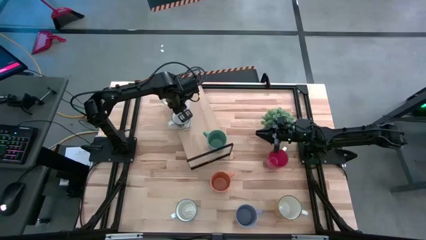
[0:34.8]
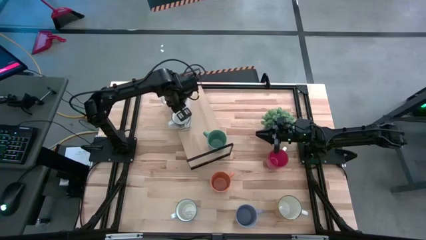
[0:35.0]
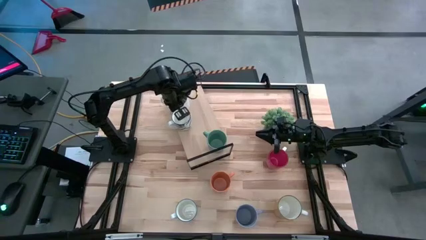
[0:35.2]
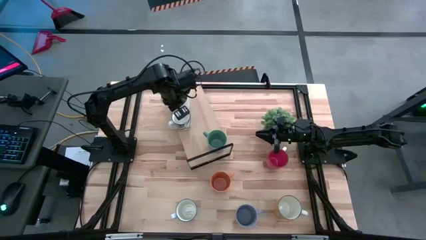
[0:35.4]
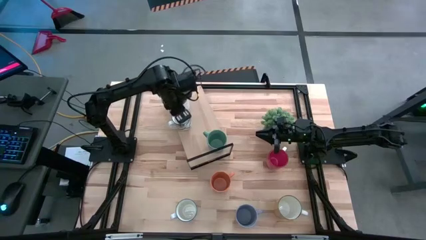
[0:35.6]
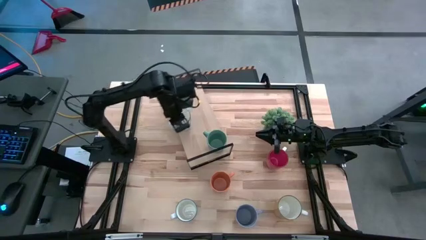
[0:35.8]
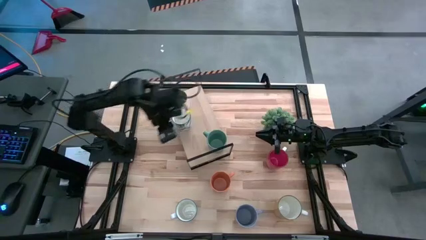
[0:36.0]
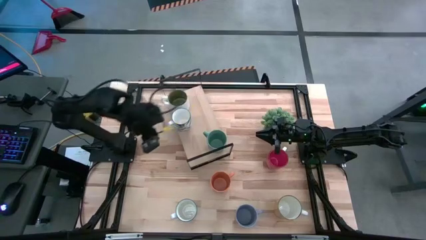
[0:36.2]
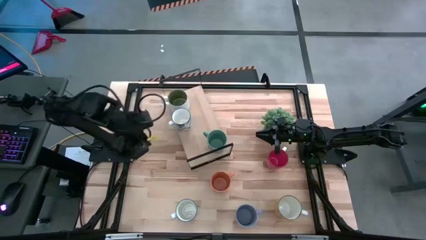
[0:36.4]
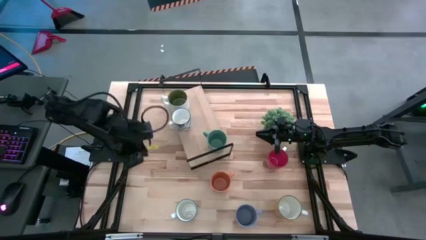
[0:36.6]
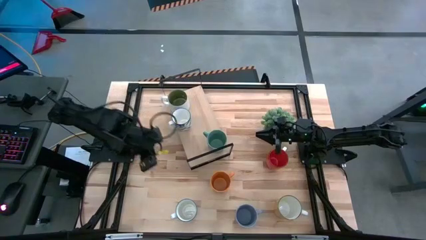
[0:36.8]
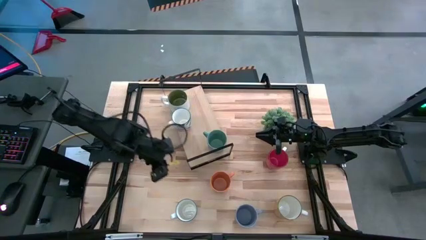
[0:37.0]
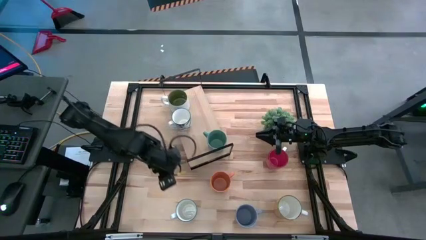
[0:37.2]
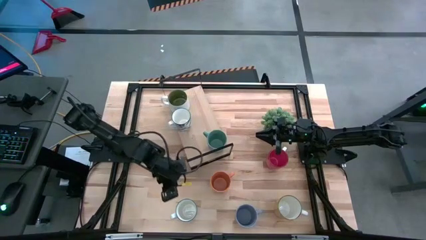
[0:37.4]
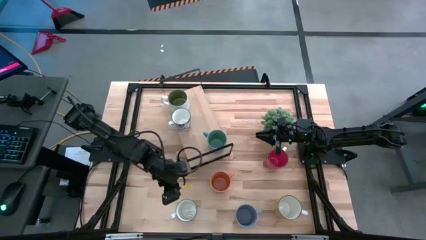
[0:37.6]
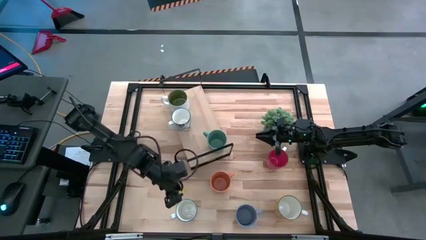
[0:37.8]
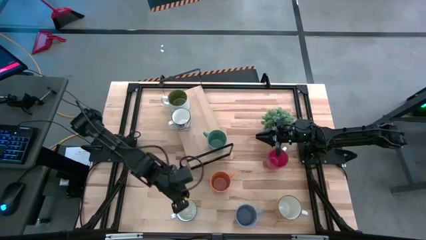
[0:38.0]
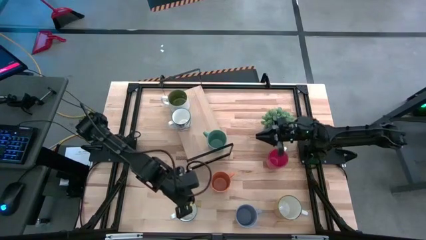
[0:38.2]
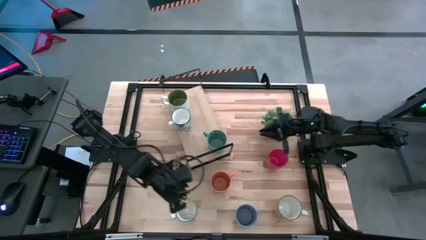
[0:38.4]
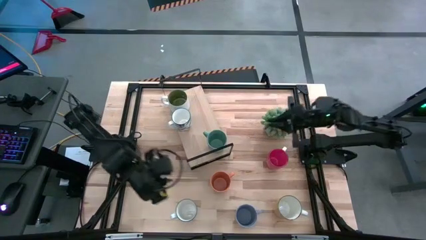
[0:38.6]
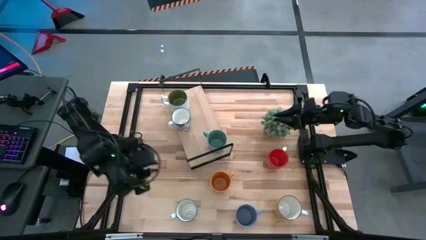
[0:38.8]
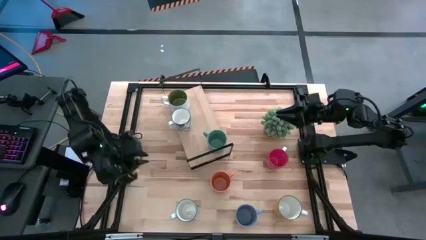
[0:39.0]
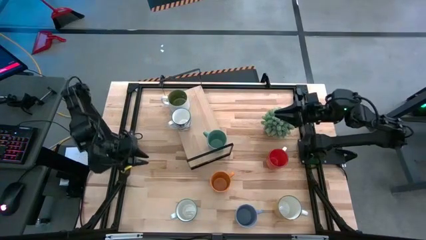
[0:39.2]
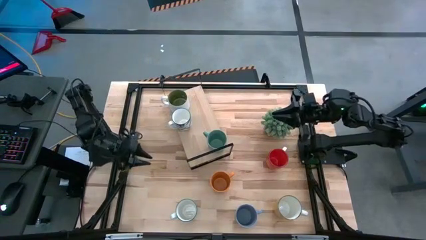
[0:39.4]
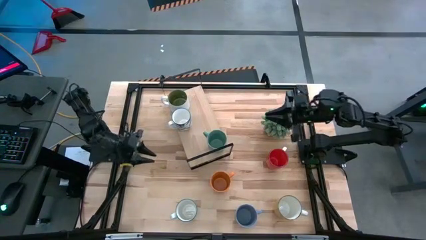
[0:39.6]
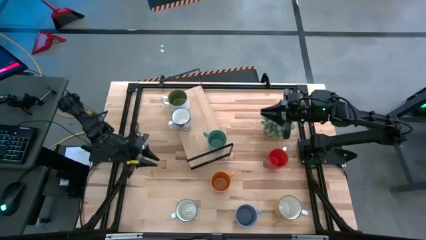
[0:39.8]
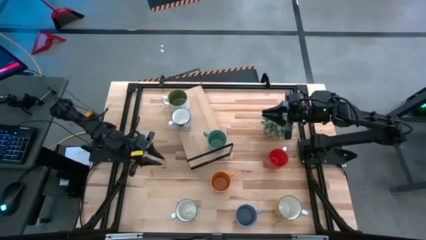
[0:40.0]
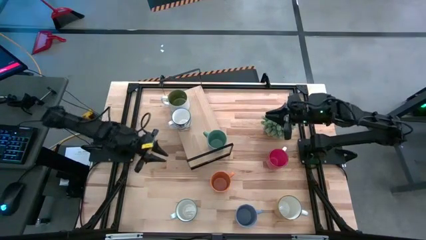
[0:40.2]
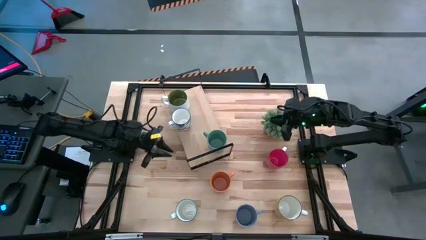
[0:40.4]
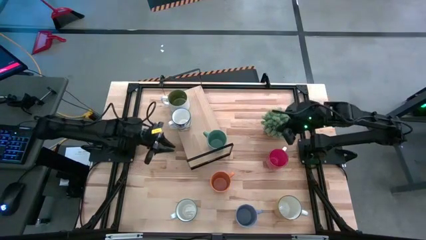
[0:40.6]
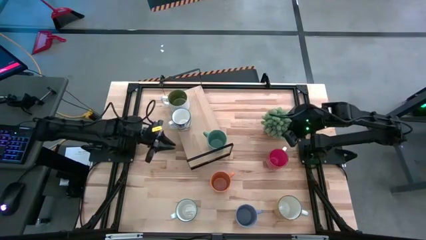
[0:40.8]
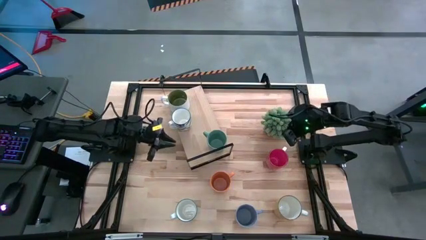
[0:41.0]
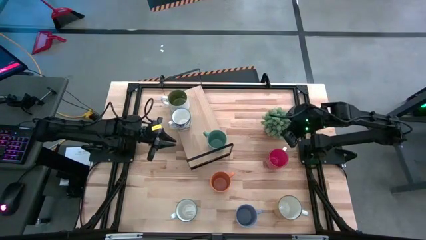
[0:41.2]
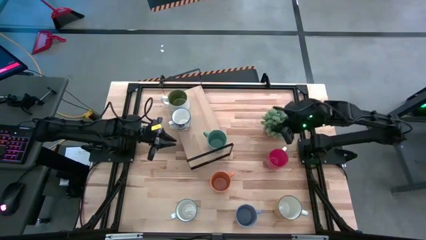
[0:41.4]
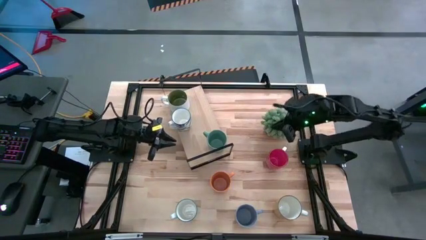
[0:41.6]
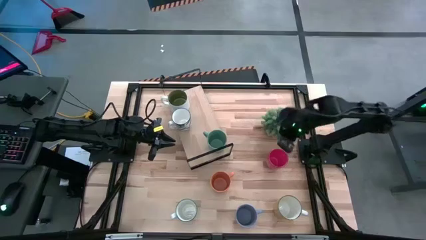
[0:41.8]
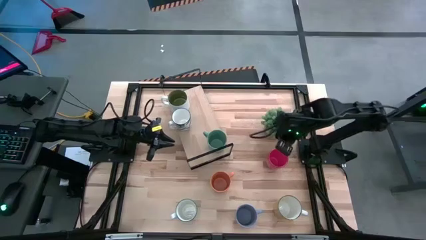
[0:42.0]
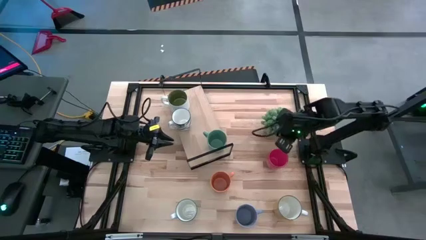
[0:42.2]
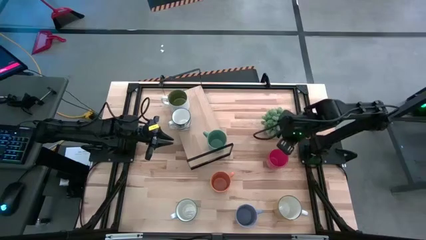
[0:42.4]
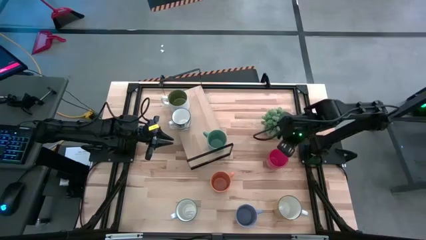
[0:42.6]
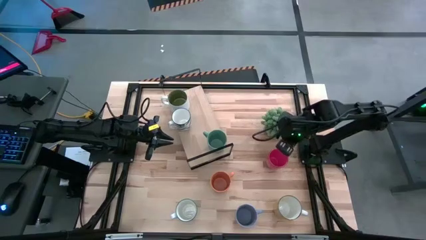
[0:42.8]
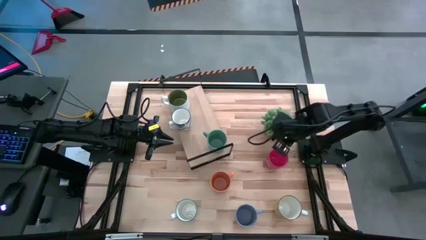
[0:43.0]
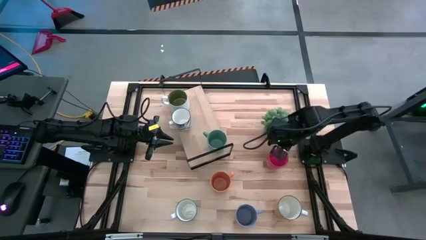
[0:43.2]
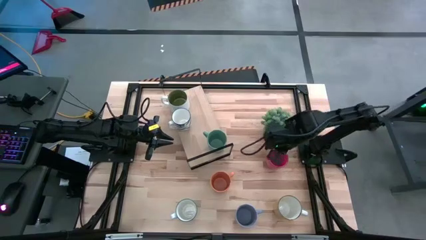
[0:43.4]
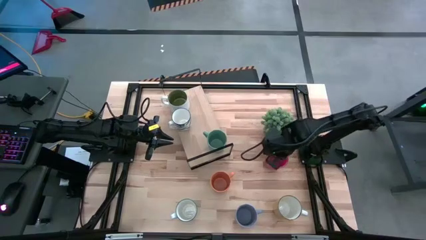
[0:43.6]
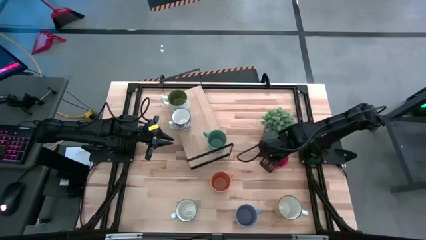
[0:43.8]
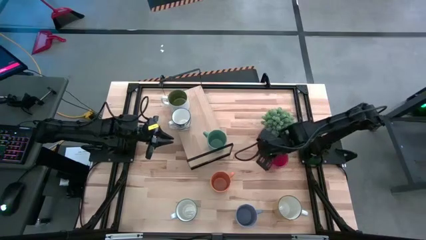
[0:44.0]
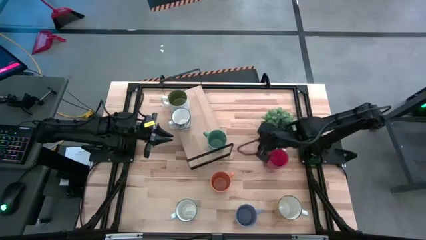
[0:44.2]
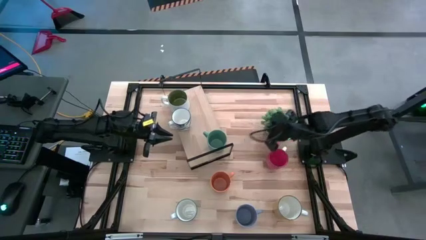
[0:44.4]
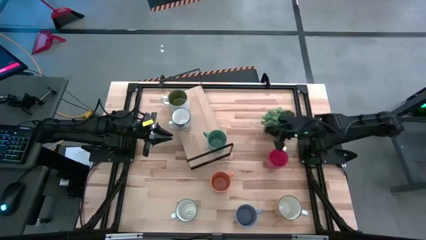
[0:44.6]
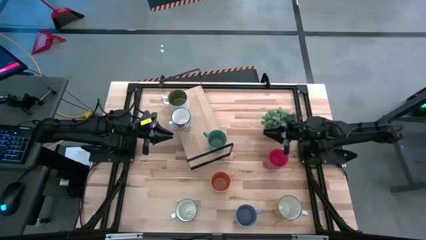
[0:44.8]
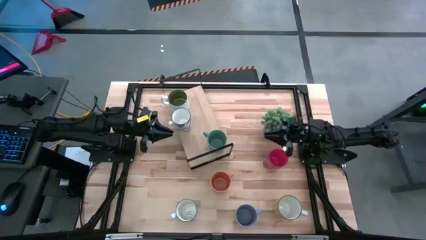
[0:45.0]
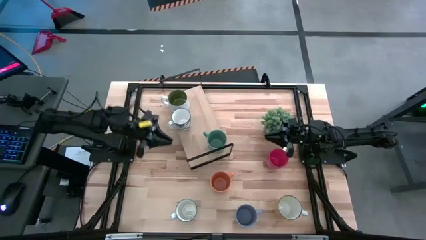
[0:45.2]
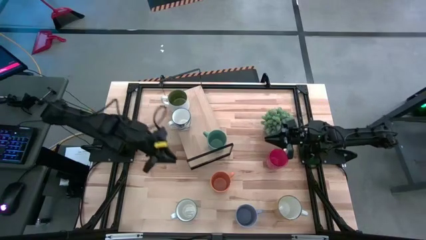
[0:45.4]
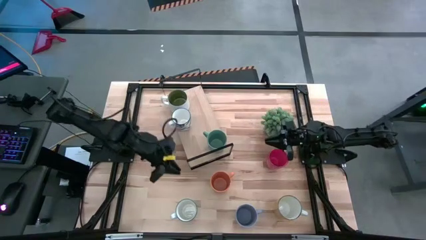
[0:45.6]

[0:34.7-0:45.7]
Task: Place coffee mugs
Put the blue mug on the shelf
